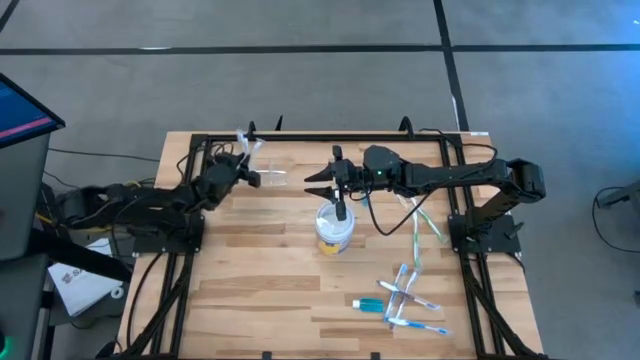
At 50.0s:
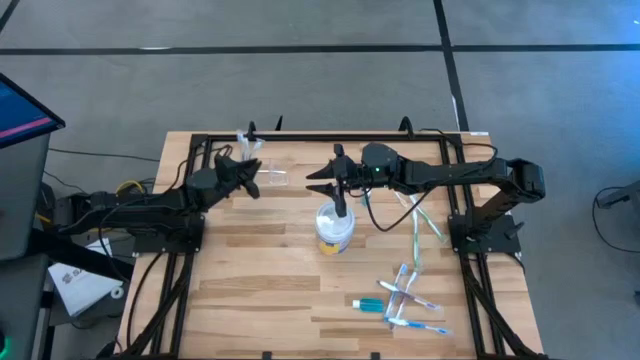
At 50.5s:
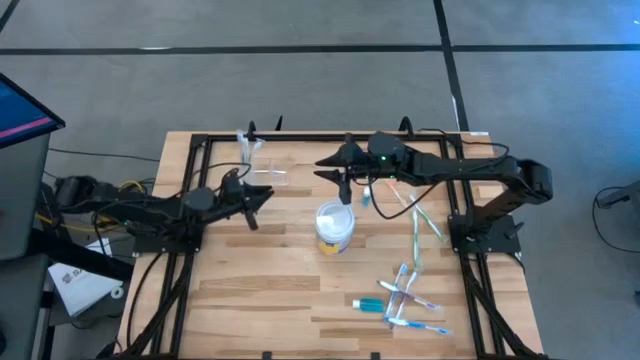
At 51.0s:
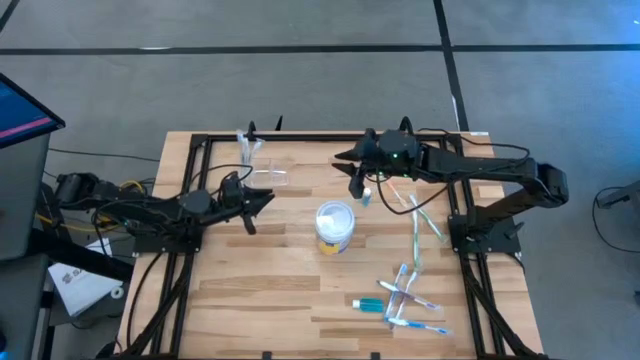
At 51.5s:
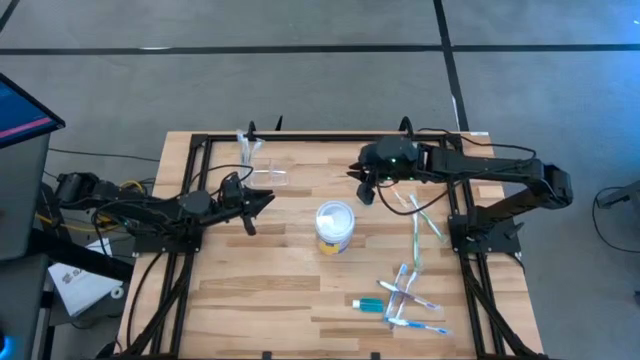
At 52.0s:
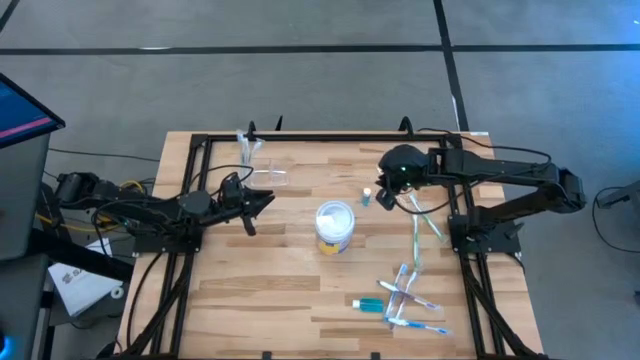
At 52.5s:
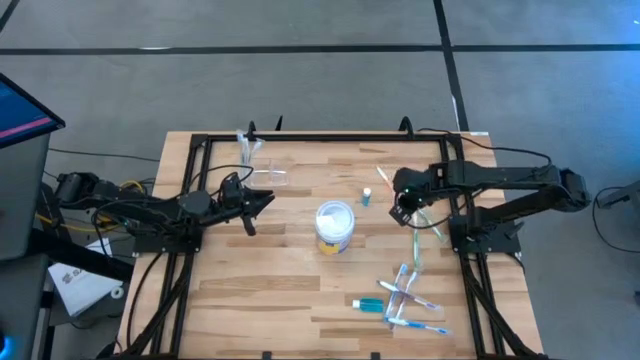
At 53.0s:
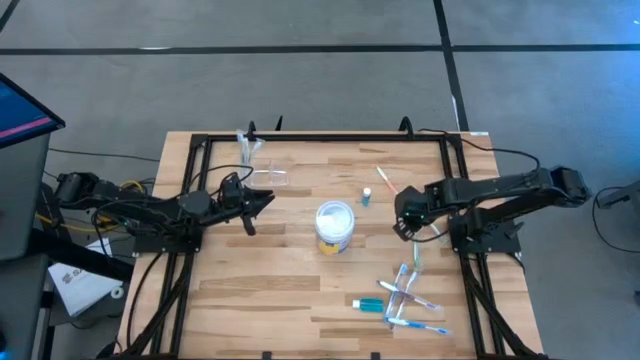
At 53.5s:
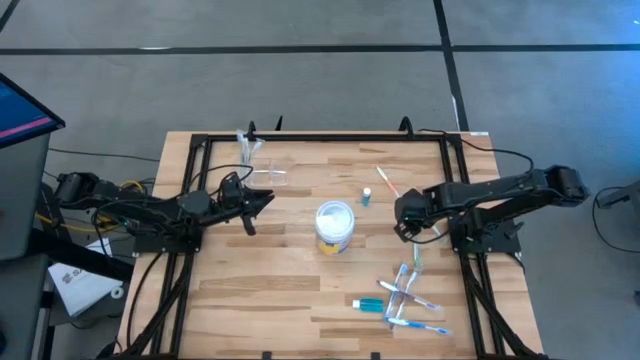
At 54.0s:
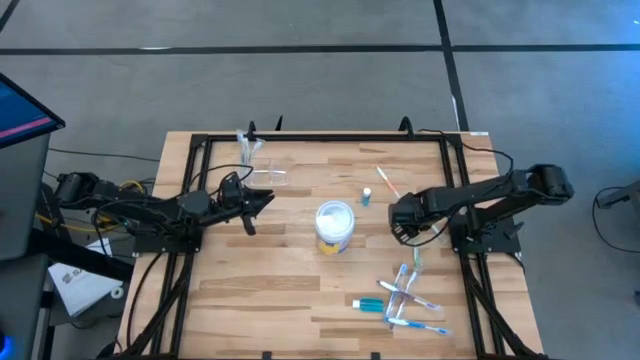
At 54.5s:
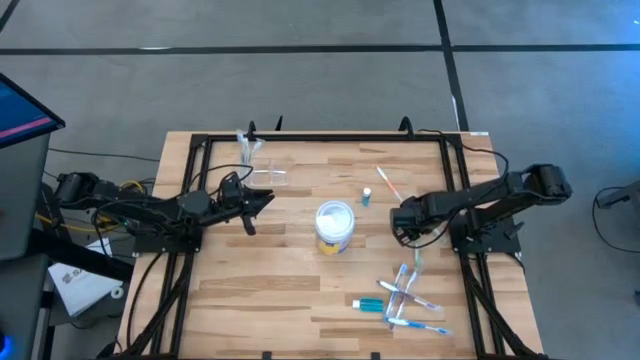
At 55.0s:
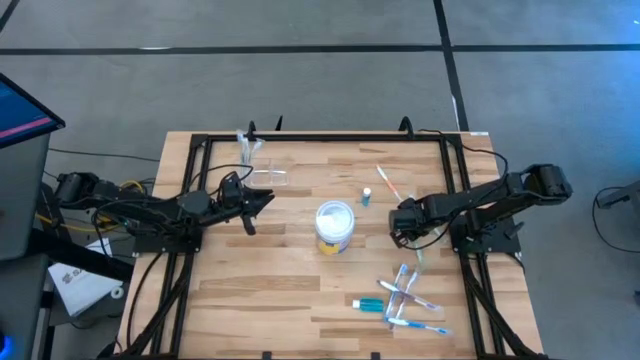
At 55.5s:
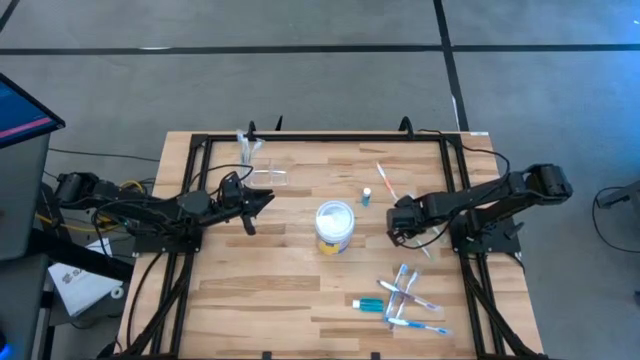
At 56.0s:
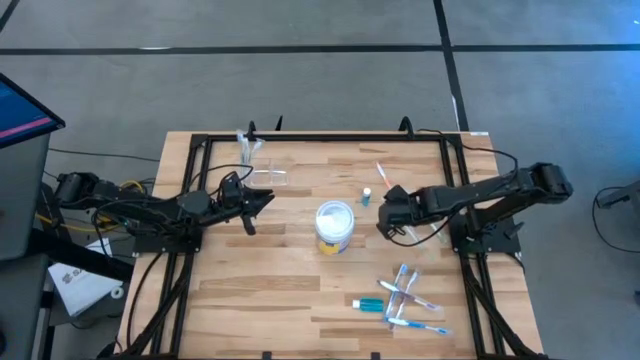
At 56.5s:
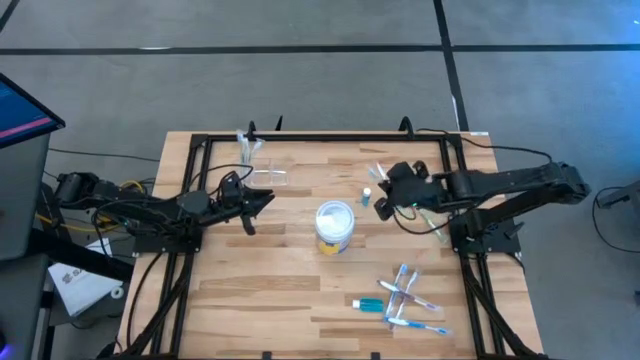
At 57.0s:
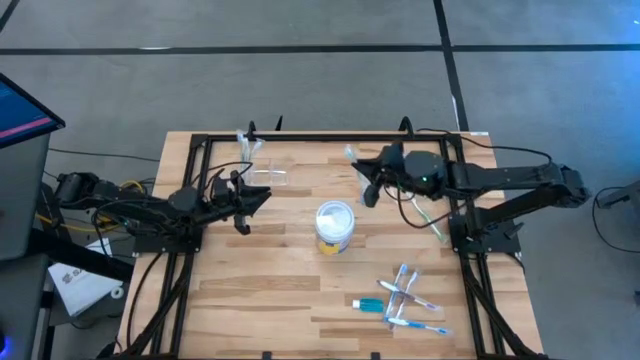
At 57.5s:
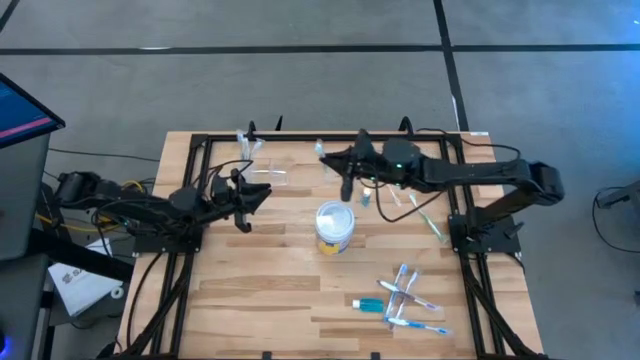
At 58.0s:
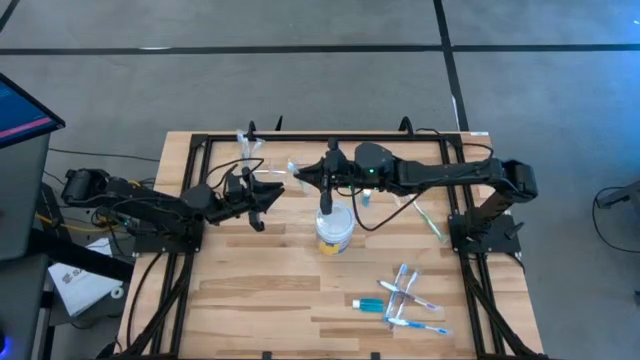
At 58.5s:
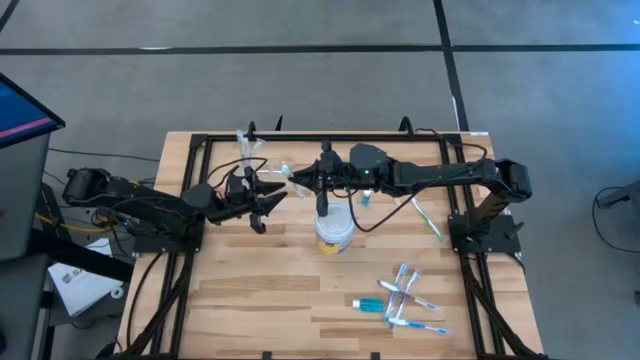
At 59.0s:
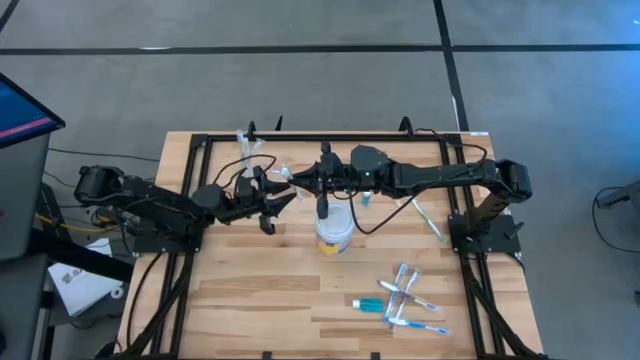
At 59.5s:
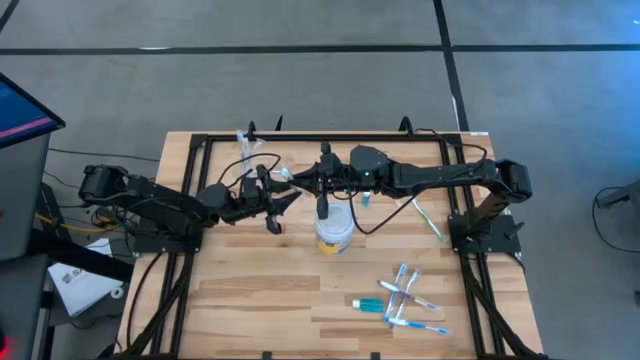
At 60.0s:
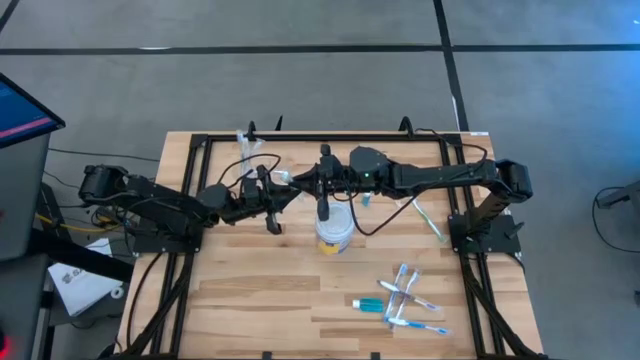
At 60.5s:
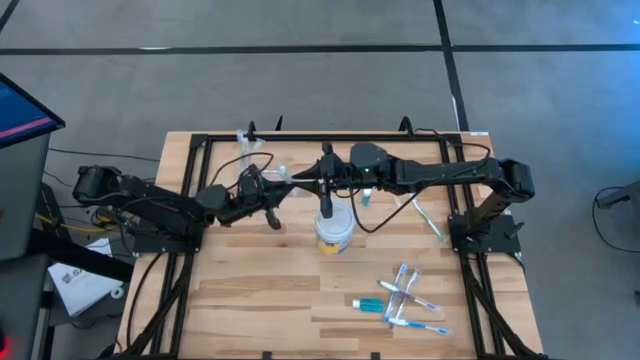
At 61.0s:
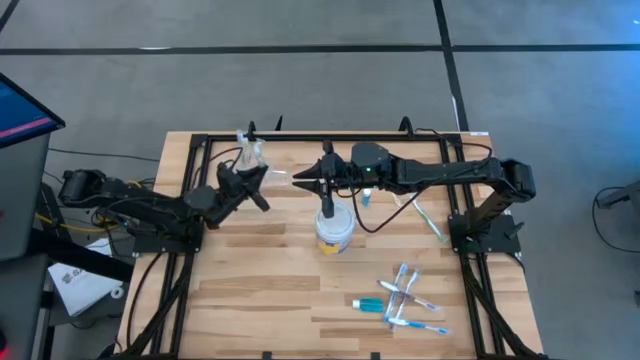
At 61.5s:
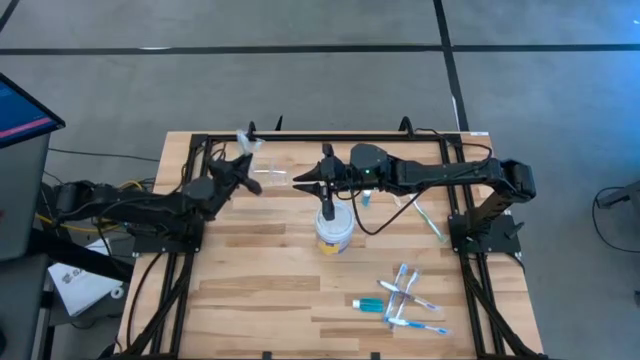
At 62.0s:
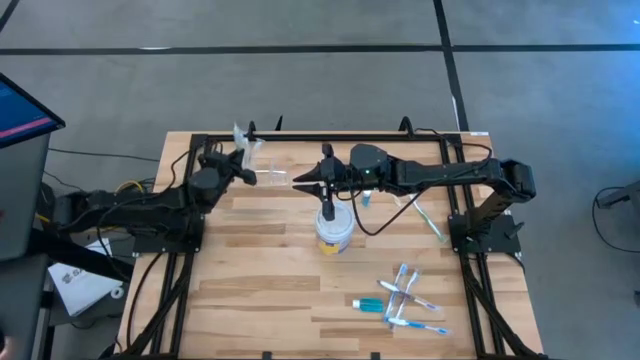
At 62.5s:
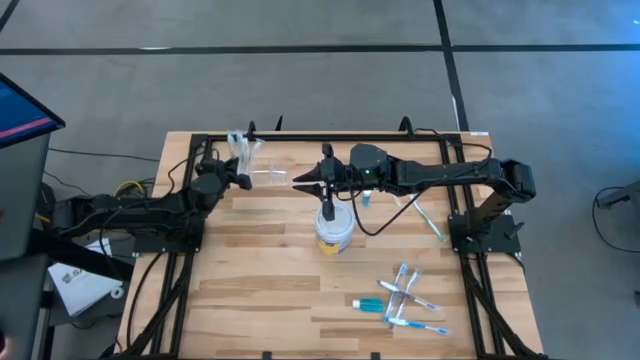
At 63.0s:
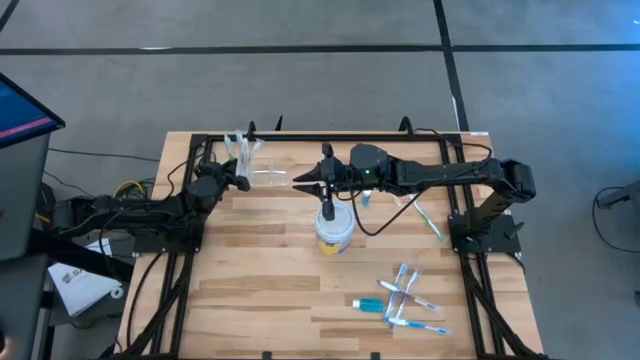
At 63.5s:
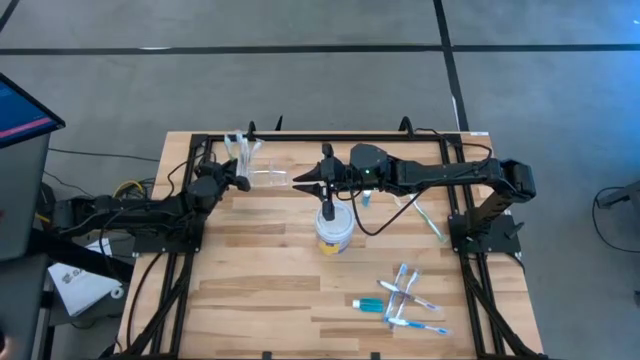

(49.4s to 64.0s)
Task: Pick & Place toothbrushing station
Put the left green toothbrush into the transparent organizer

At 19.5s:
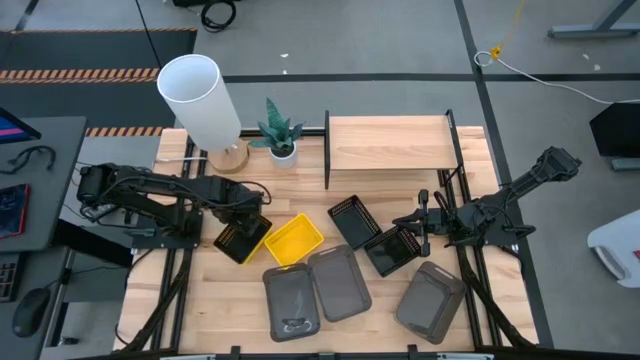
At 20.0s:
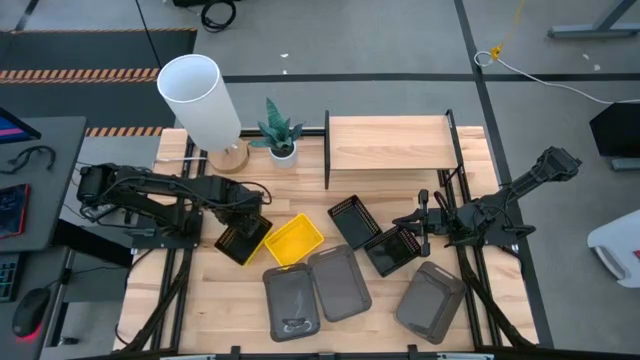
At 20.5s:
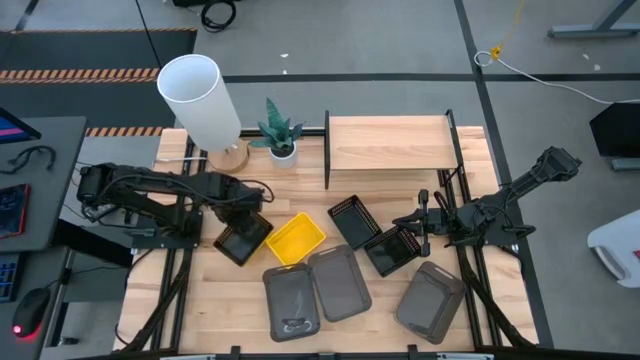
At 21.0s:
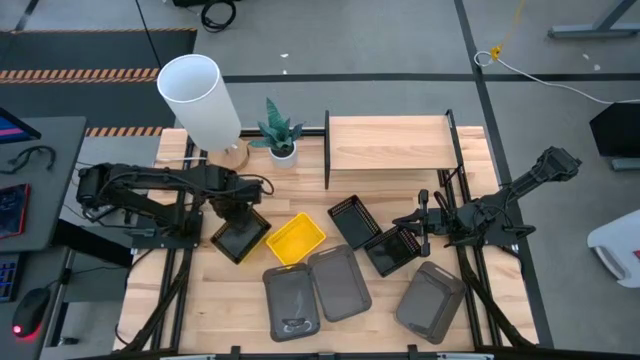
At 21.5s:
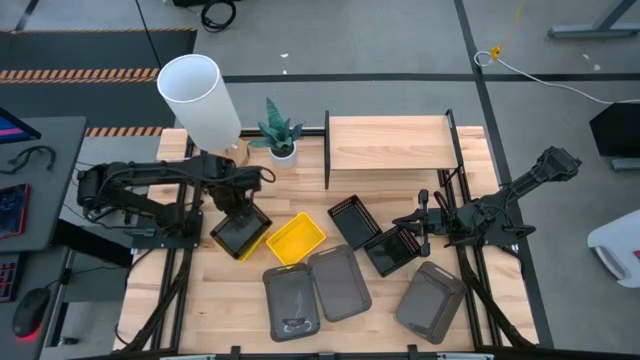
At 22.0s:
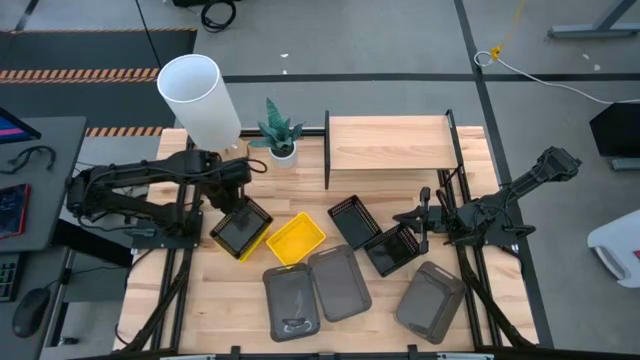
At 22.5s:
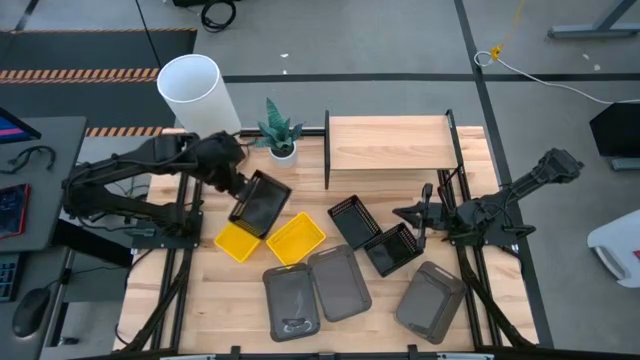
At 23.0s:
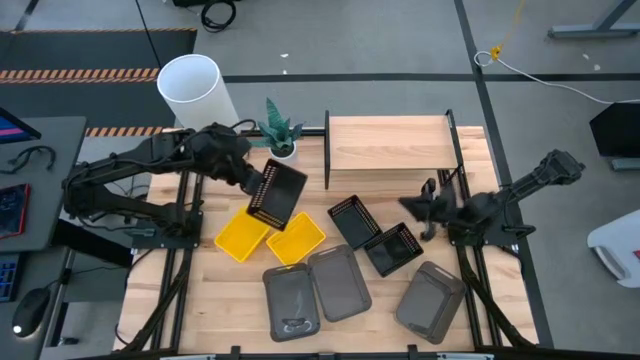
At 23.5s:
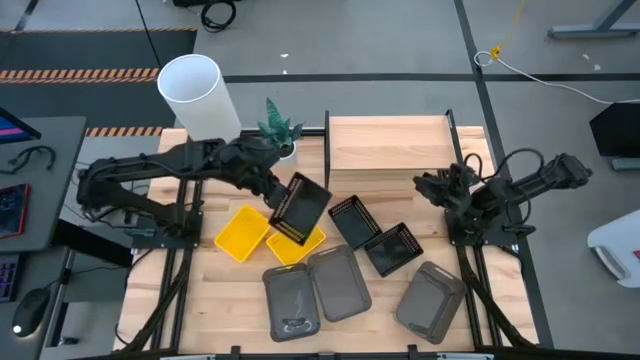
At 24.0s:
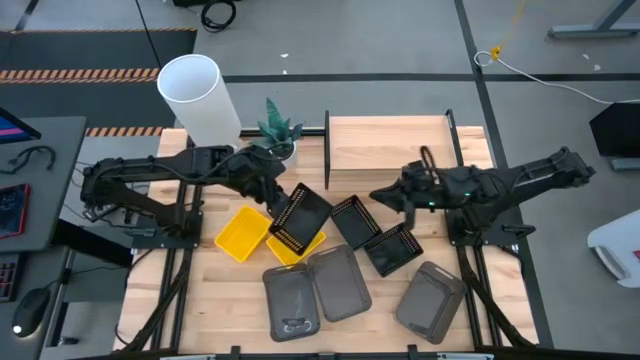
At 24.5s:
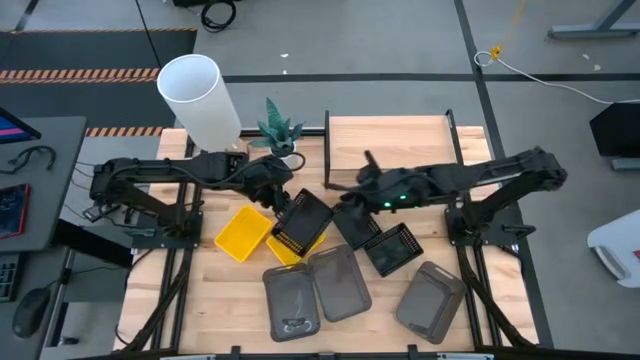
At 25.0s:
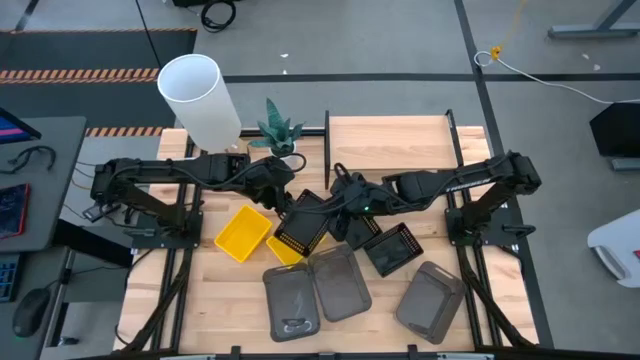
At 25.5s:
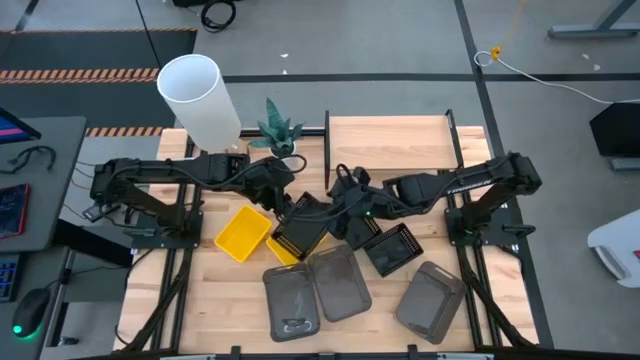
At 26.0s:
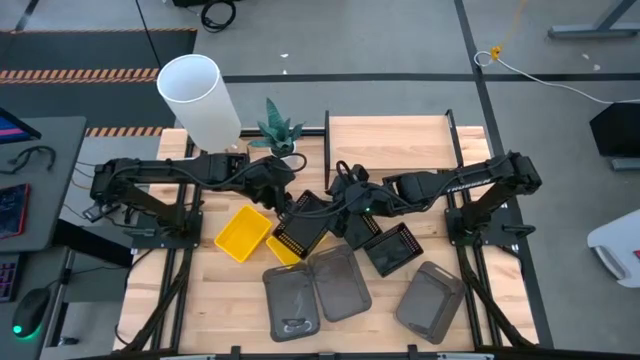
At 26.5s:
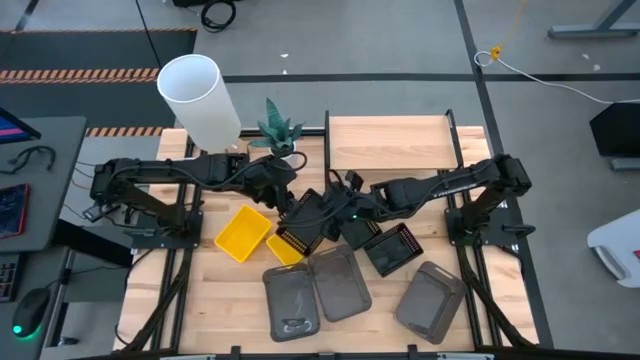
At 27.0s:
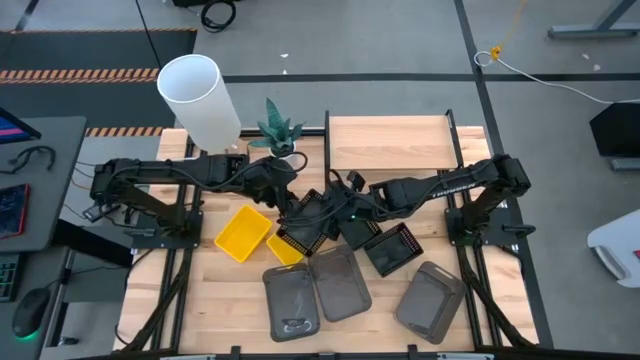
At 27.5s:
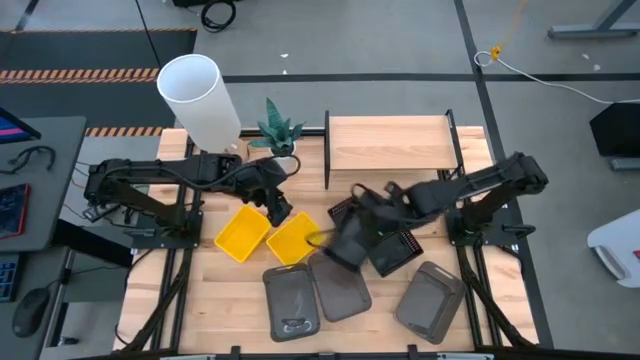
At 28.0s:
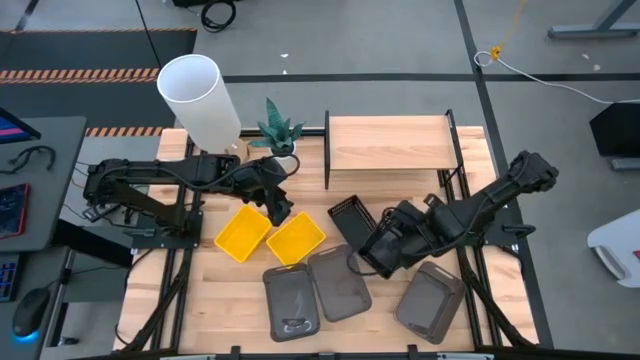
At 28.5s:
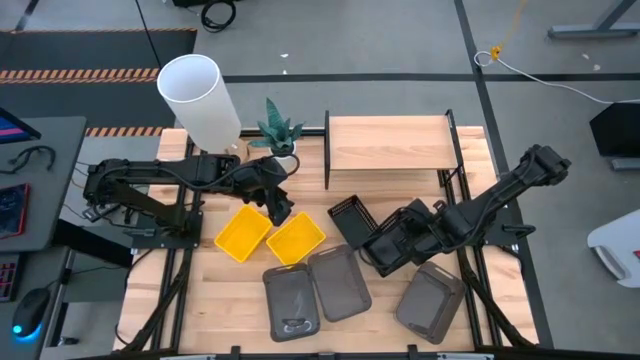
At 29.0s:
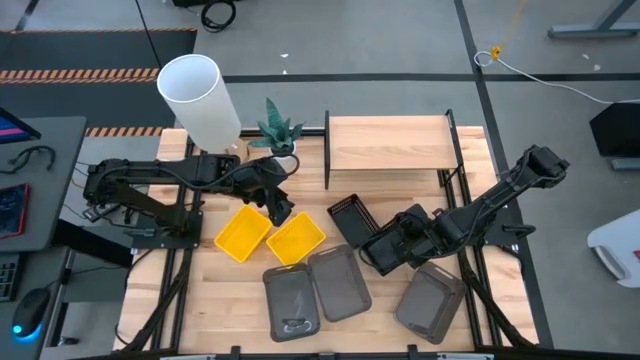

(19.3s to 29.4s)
Task: Stack baskets on shelf by color
Stack the bottom black bin on top of the middle black bin
